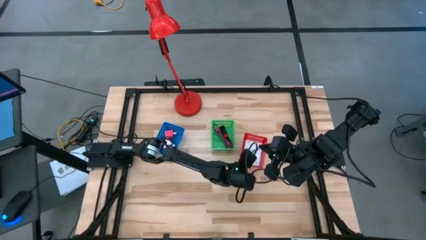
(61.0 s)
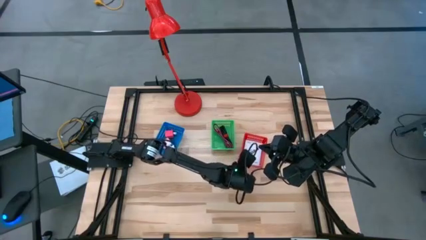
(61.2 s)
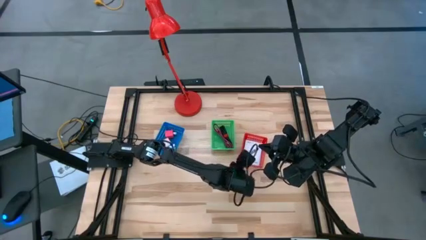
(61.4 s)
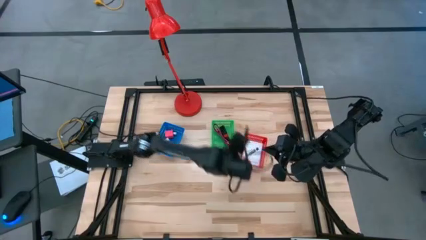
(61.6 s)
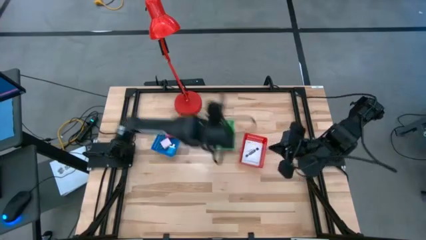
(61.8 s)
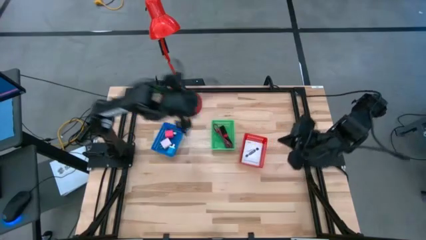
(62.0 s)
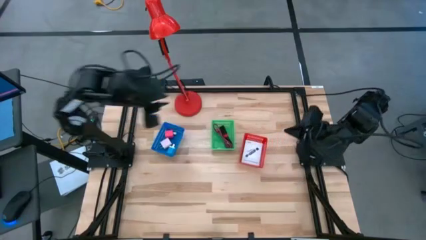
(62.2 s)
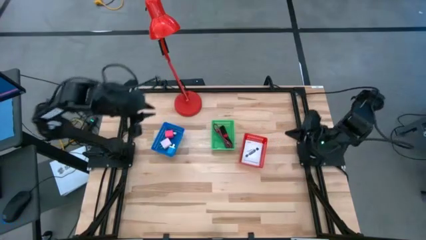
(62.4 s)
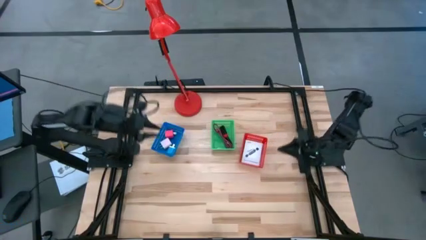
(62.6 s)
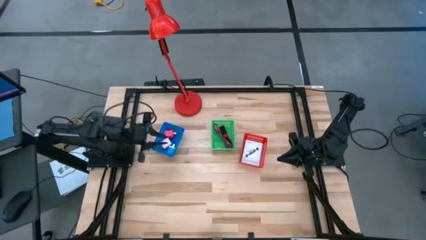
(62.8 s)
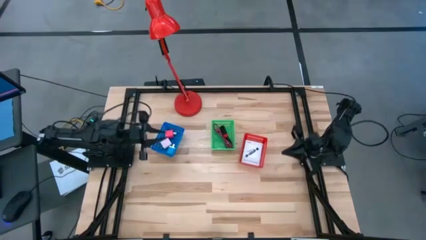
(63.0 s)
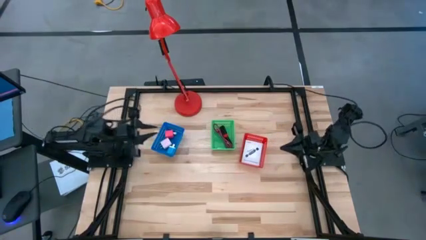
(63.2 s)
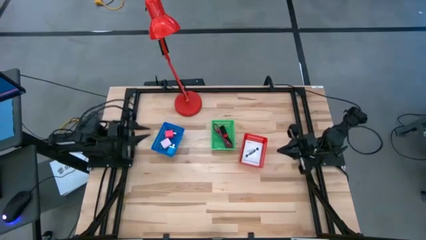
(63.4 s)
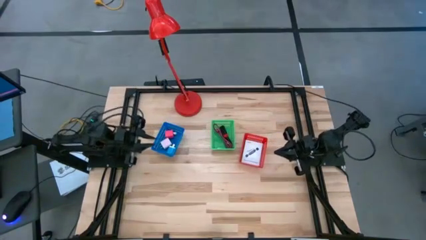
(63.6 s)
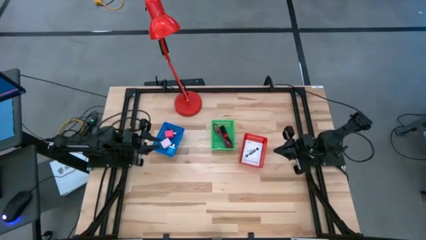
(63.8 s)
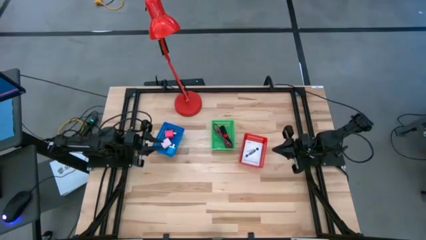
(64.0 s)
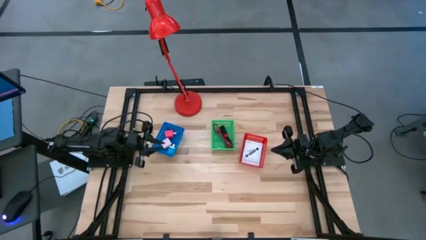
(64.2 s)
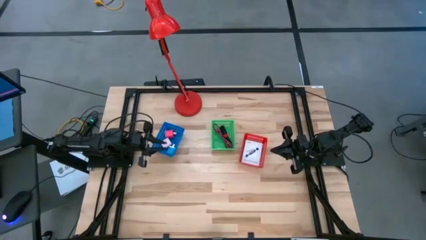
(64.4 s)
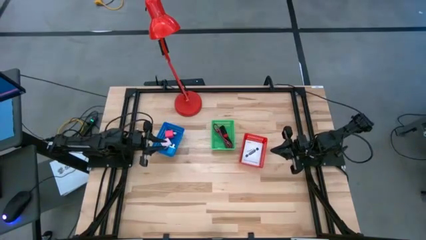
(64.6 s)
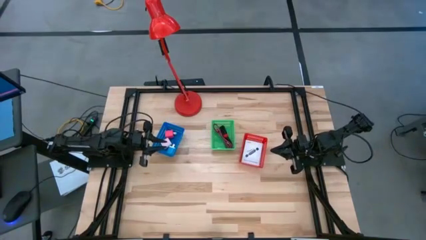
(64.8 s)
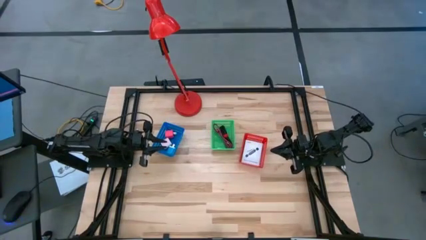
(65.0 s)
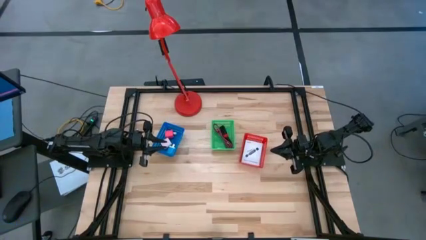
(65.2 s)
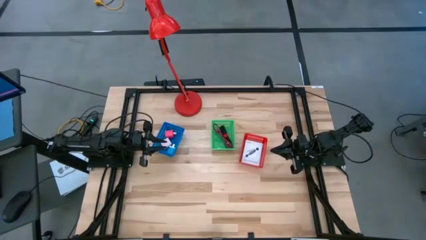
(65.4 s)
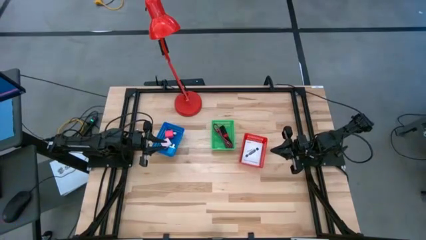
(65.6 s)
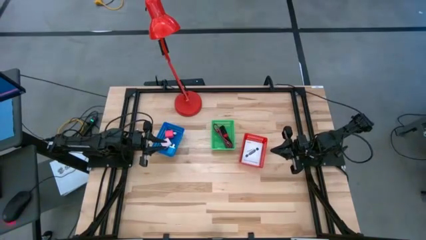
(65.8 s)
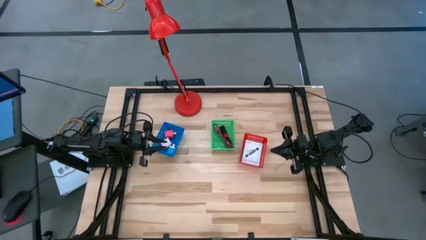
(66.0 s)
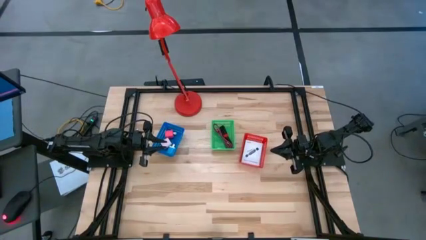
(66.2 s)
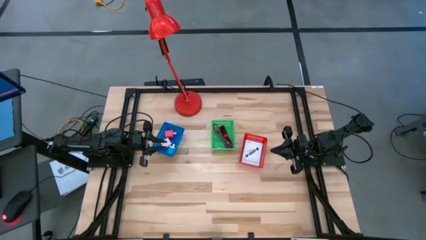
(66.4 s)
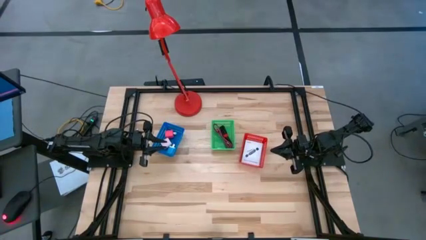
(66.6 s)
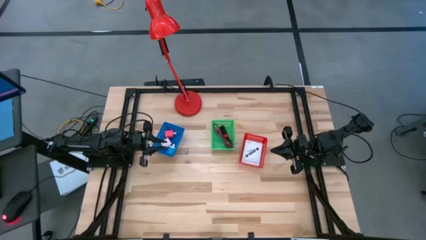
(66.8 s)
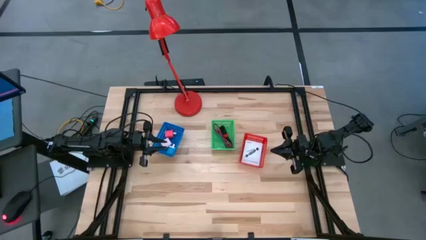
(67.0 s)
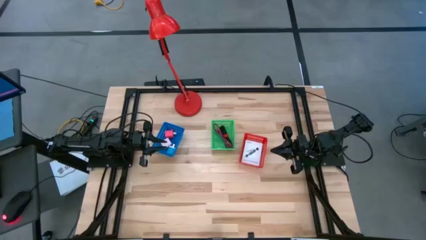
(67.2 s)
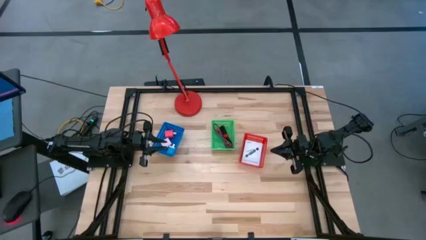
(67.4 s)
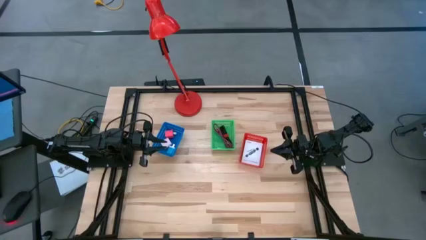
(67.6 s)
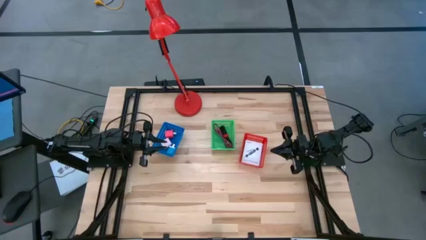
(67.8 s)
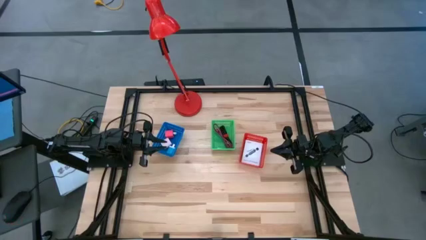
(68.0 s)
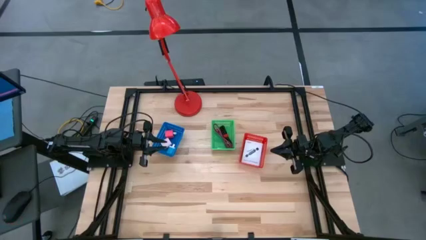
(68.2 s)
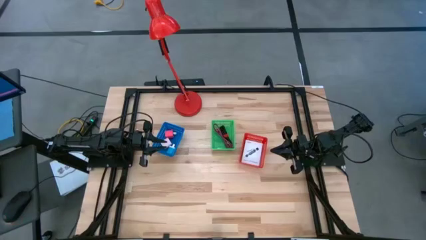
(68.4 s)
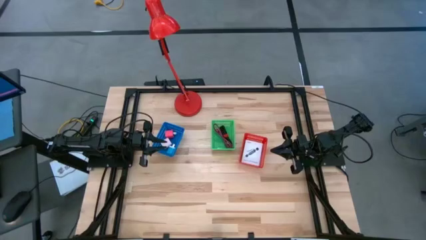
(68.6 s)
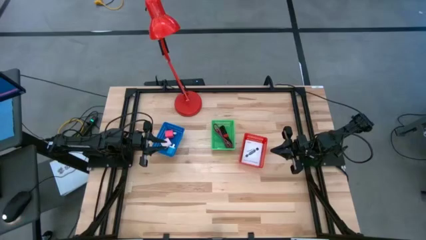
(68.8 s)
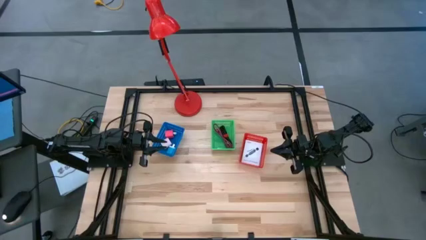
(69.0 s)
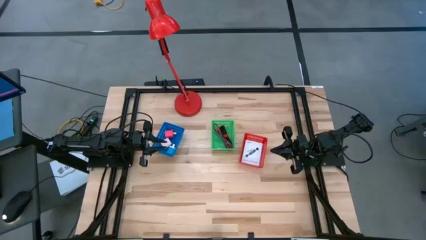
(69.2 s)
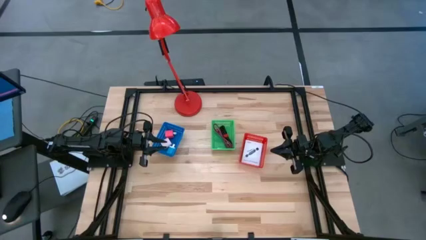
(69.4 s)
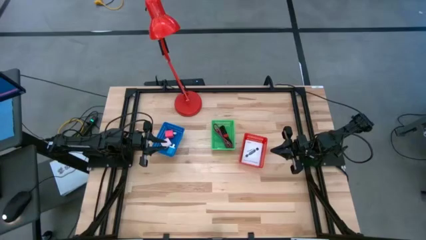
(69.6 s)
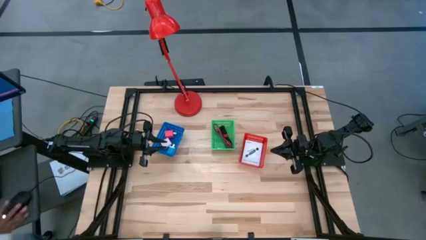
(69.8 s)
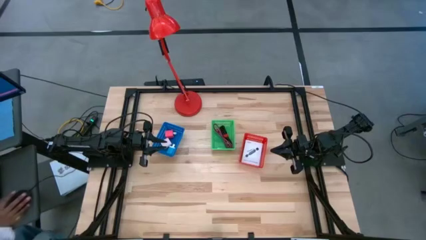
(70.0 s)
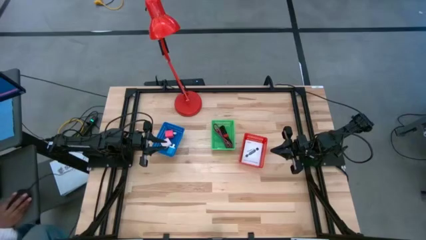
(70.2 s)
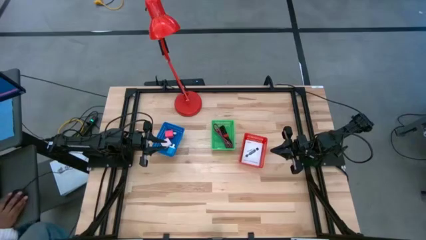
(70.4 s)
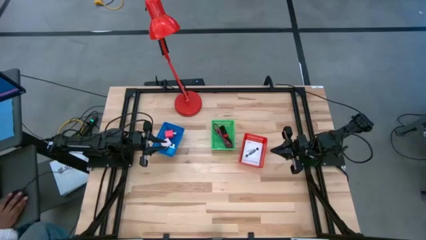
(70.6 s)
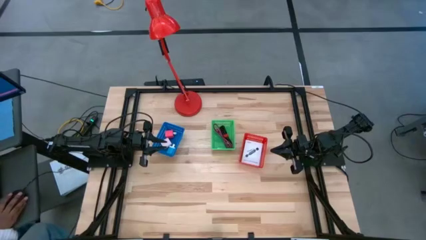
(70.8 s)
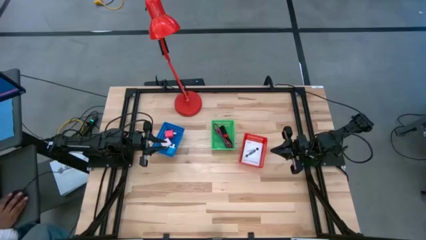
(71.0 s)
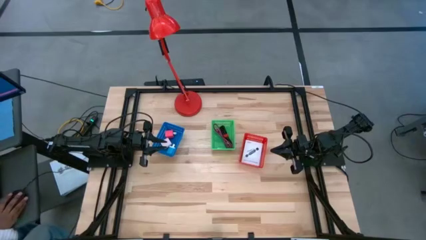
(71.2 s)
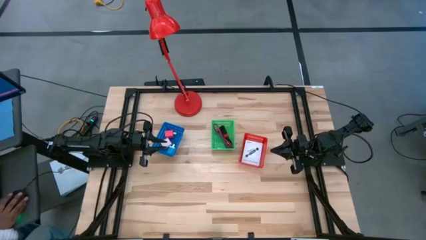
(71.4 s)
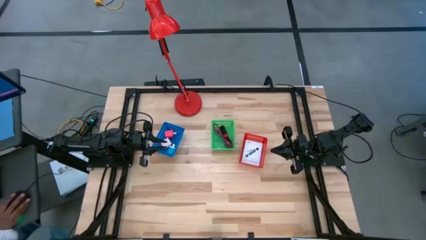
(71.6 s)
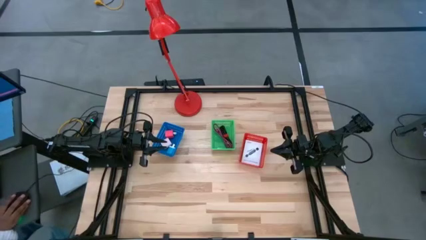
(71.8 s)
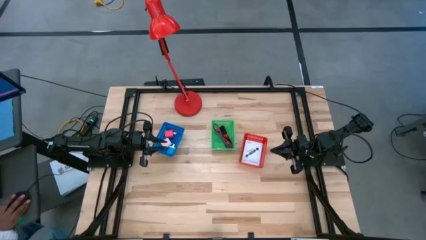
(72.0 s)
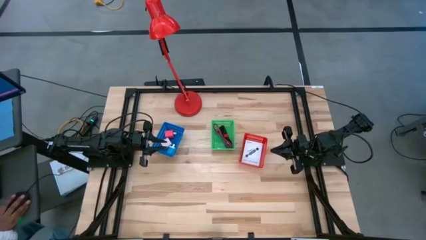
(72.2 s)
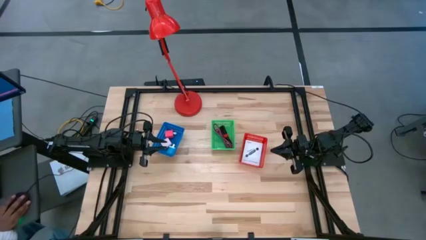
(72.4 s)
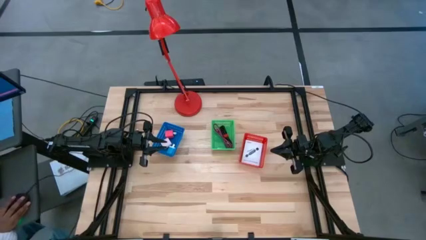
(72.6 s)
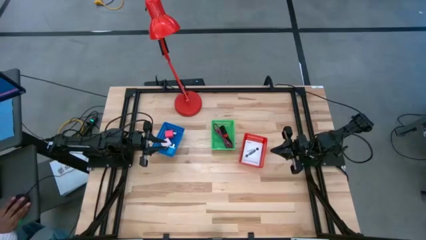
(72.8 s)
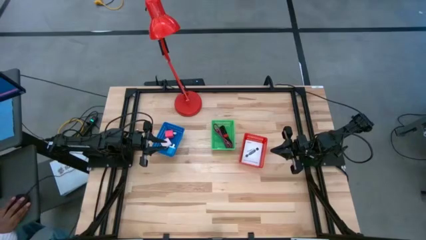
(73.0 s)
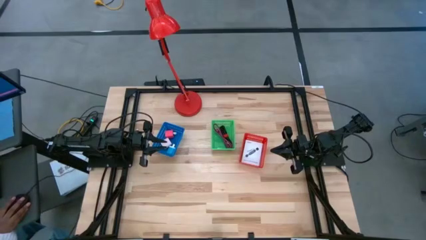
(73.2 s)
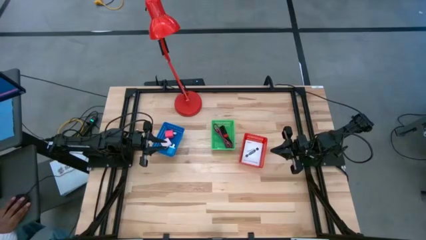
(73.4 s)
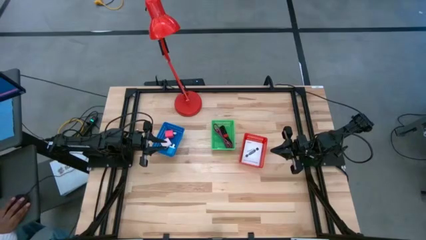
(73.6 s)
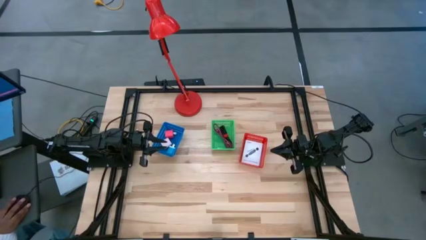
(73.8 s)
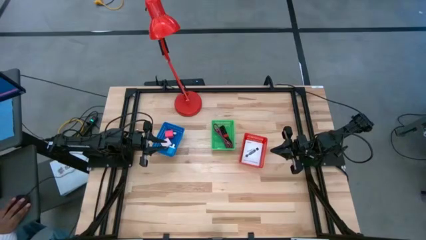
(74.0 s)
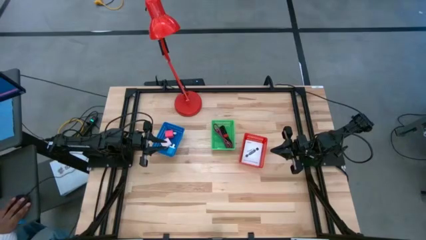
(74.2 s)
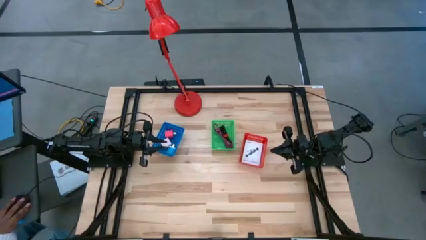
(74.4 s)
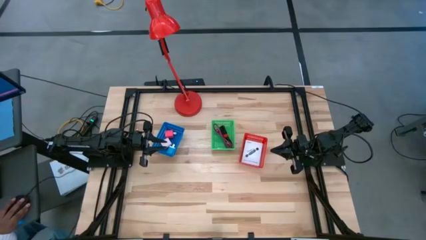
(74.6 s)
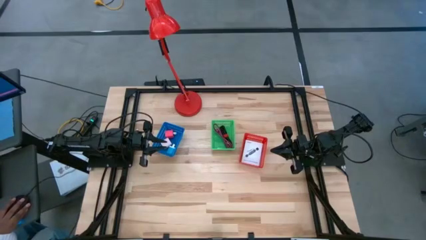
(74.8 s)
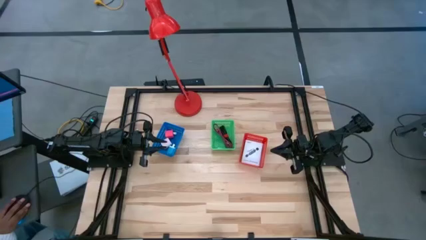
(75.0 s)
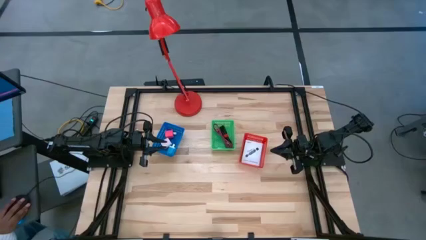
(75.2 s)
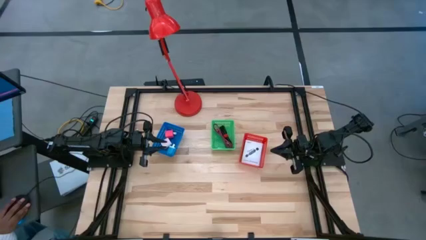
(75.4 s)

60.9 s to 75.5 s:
Task: Pick and place items into bin
Return to Home Position
